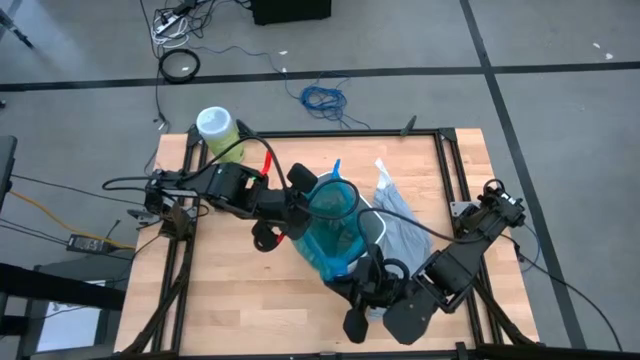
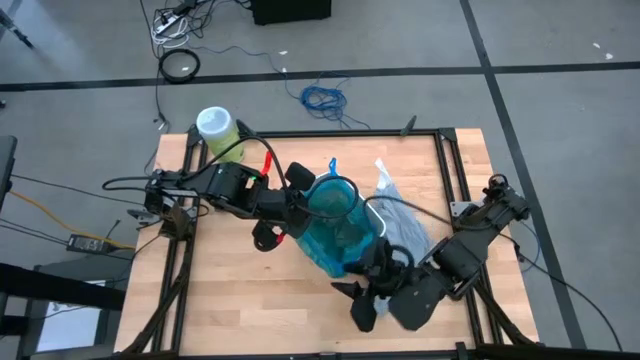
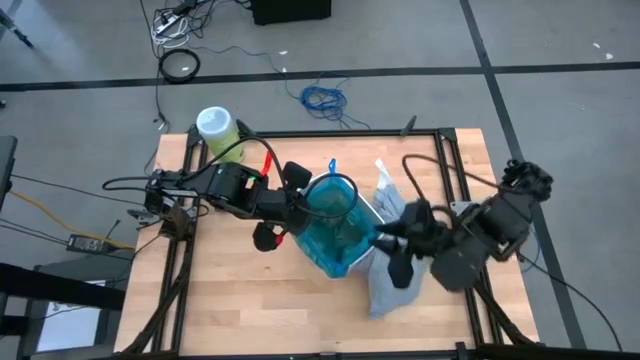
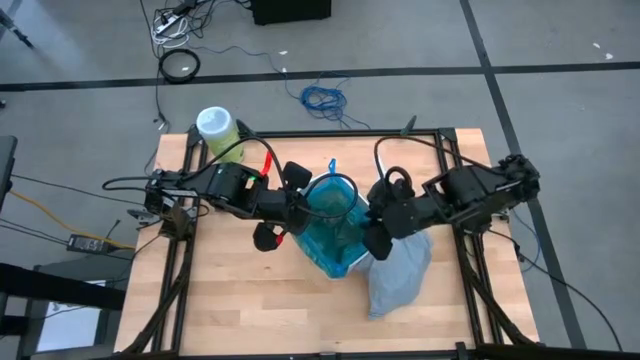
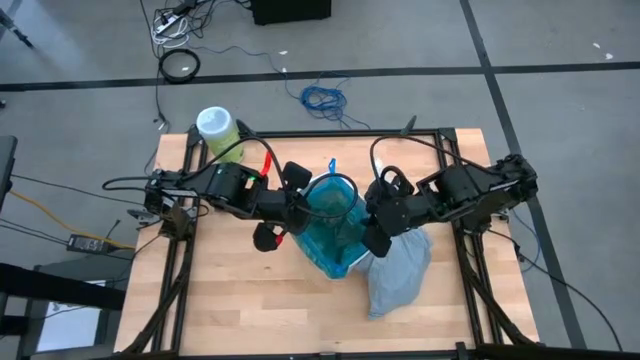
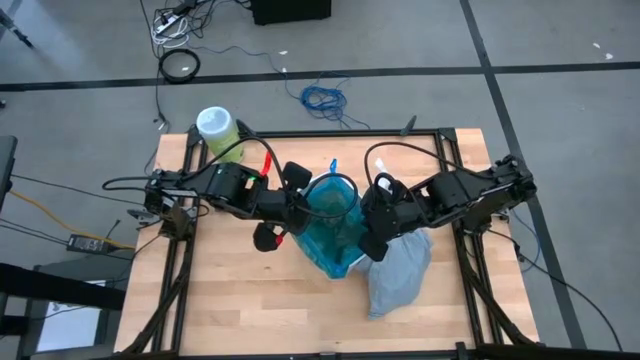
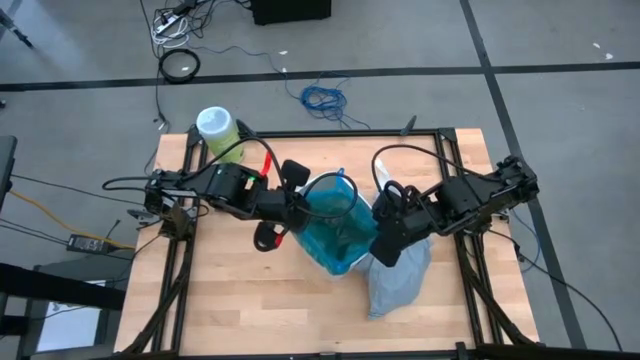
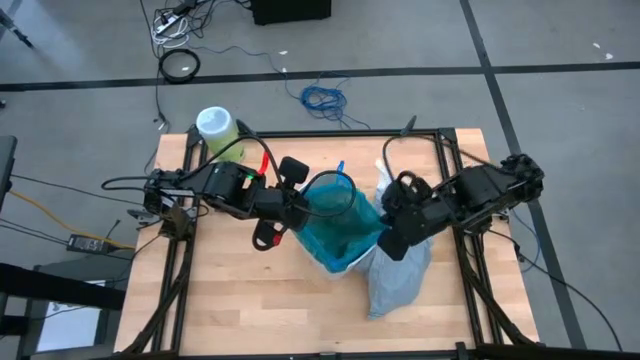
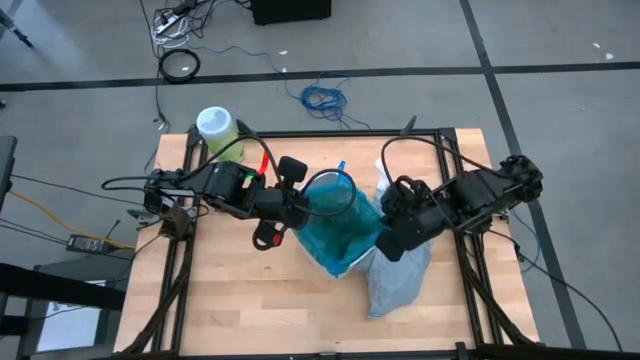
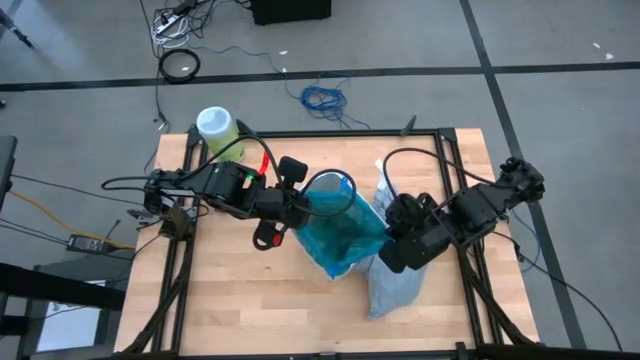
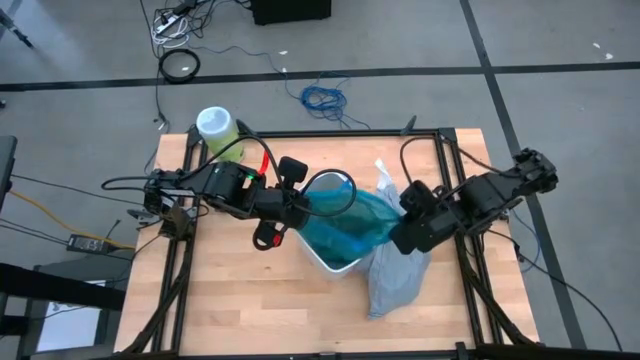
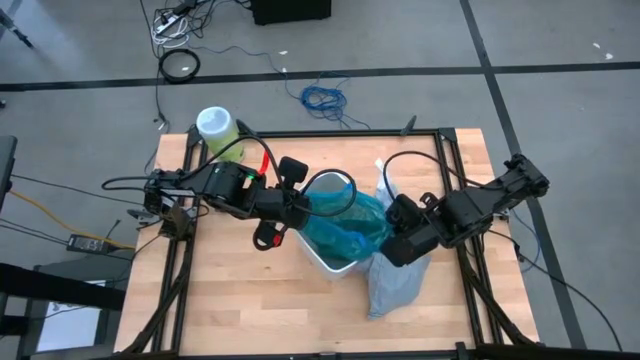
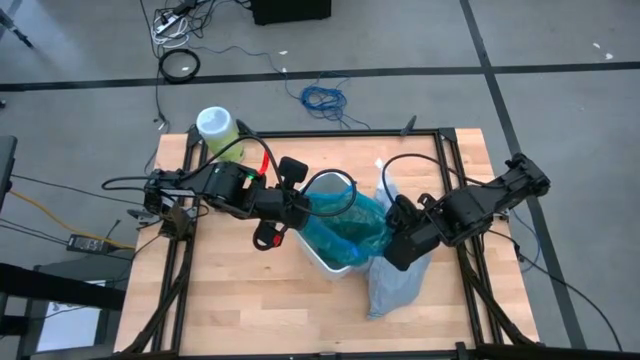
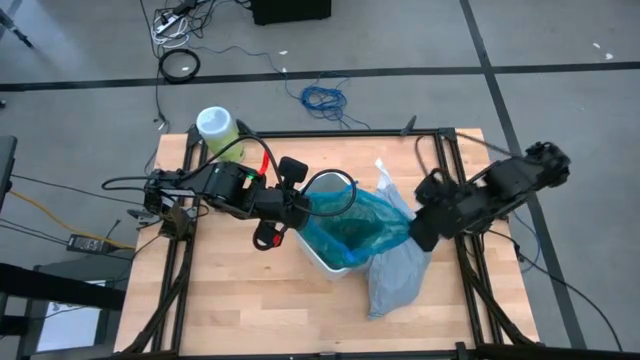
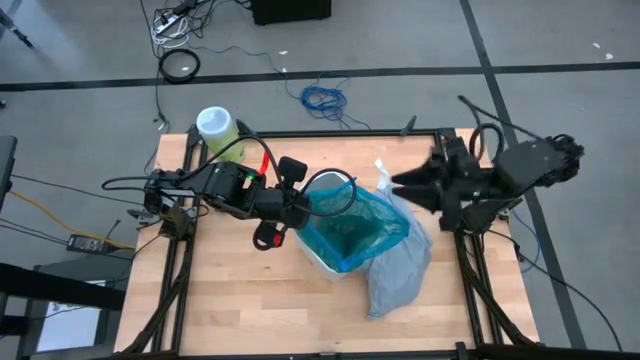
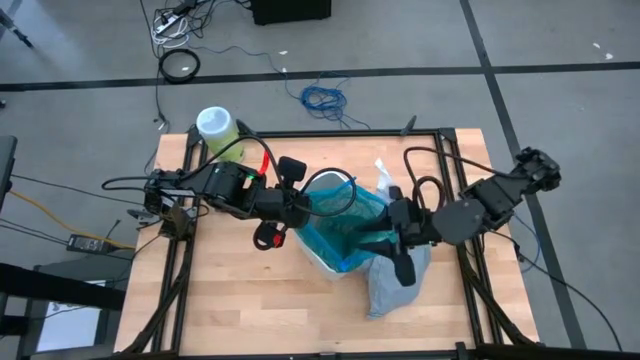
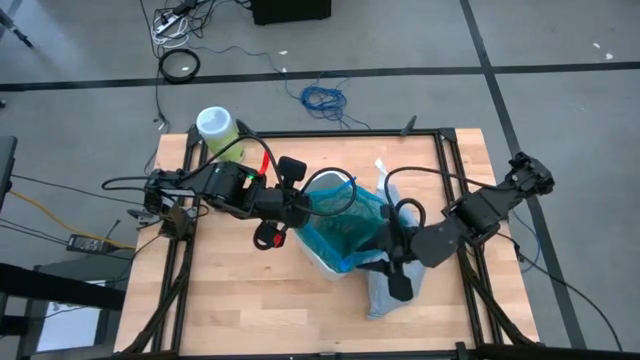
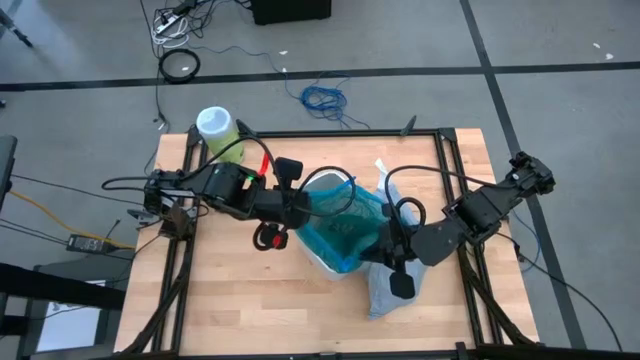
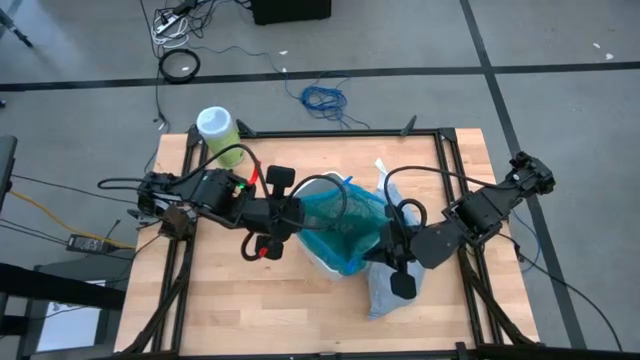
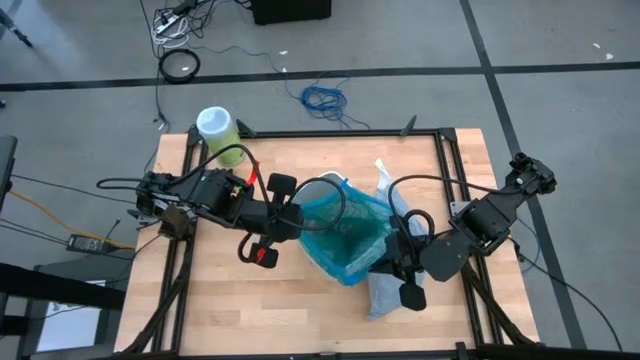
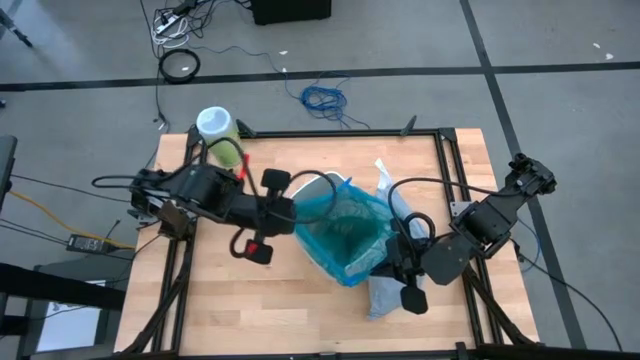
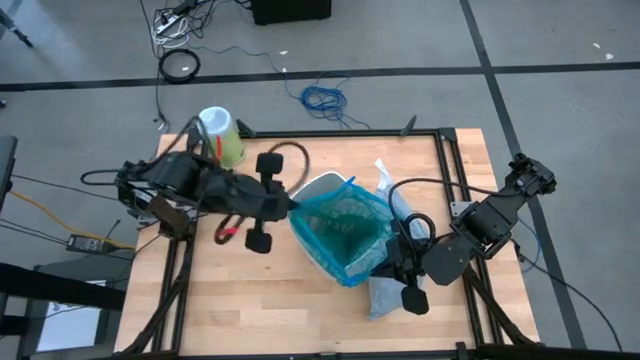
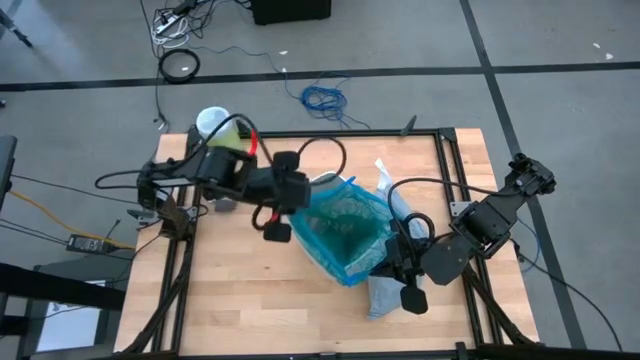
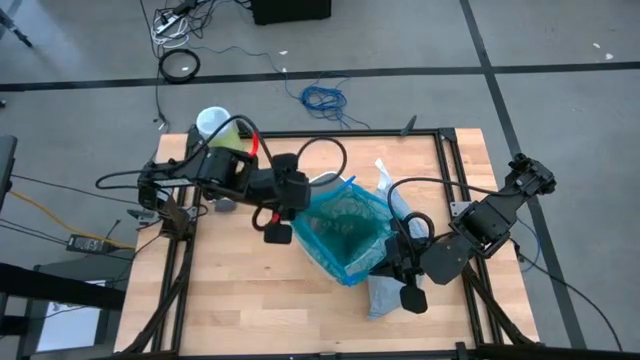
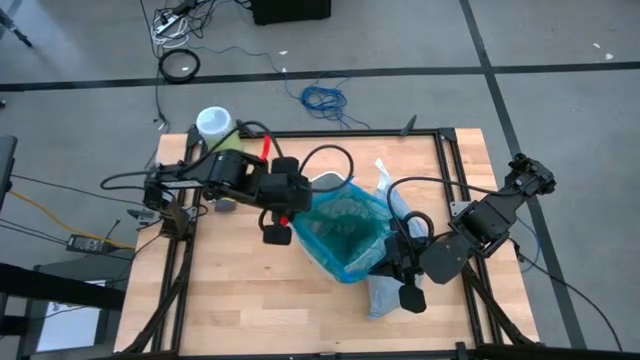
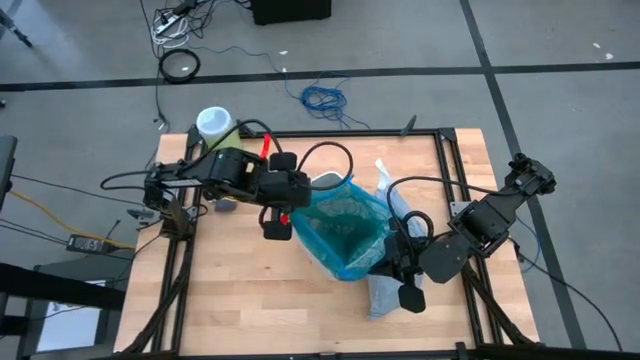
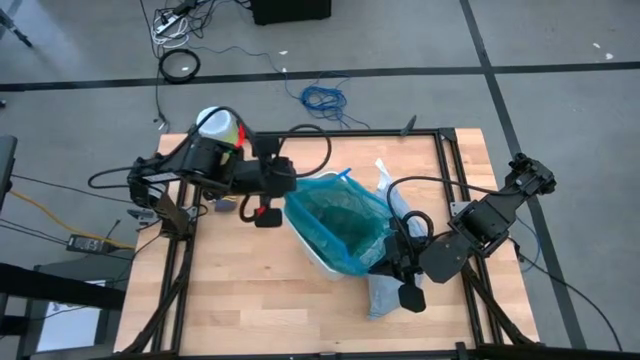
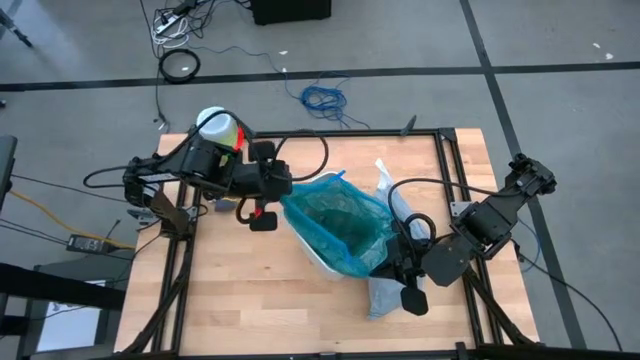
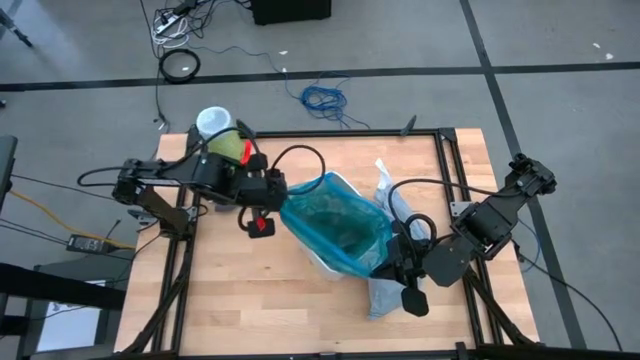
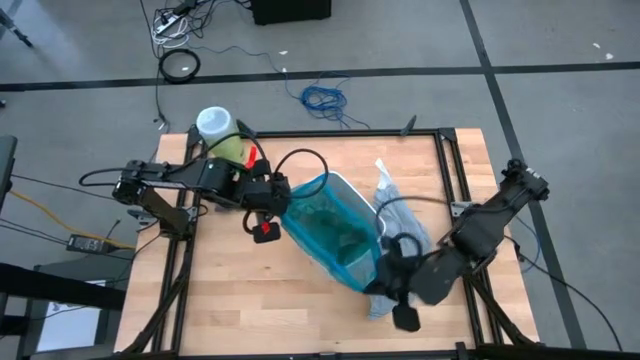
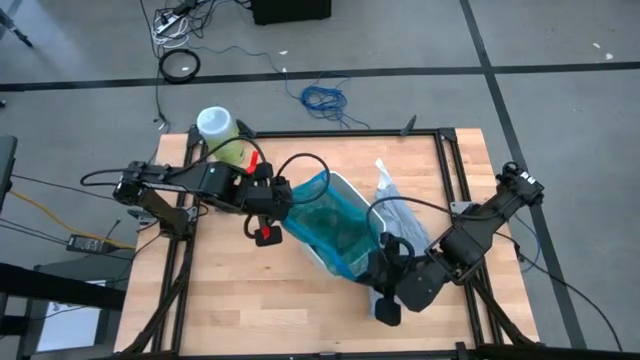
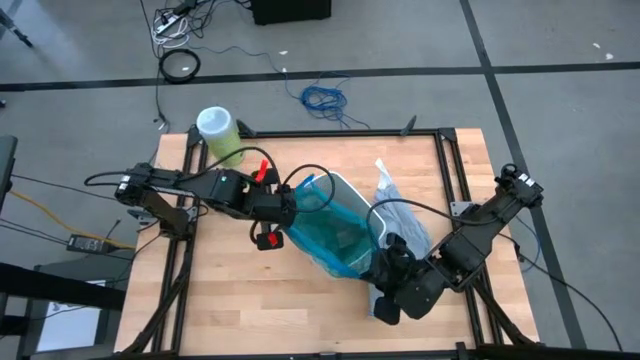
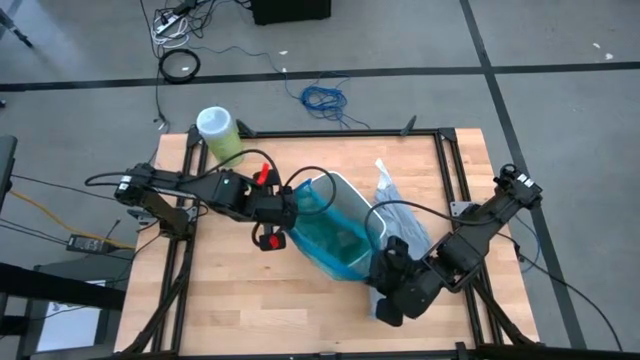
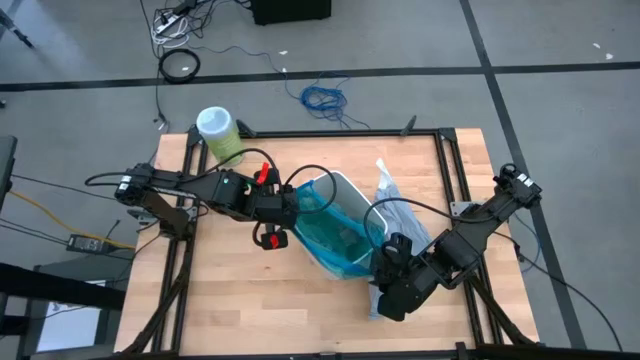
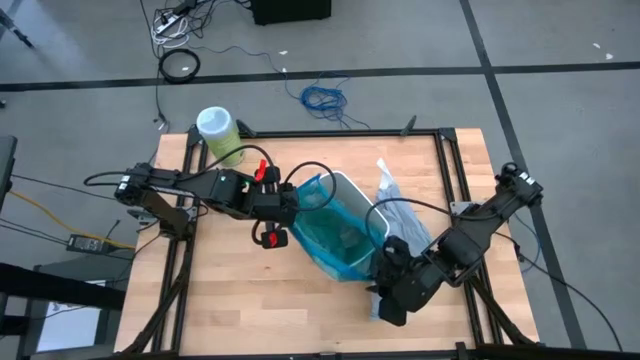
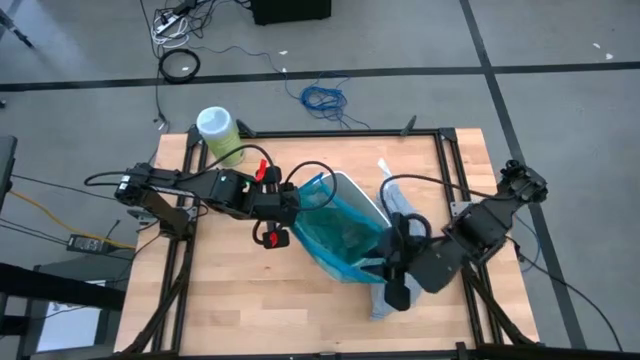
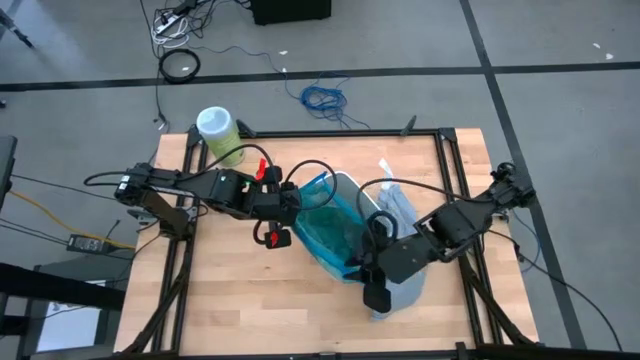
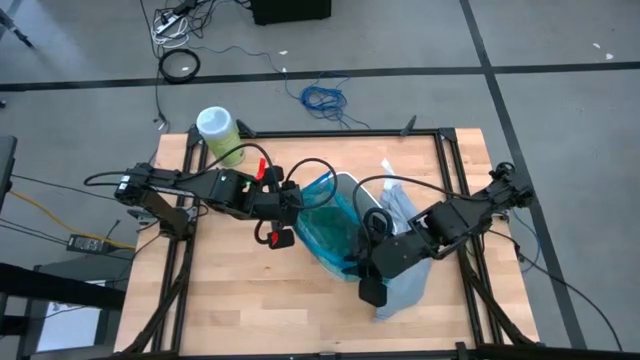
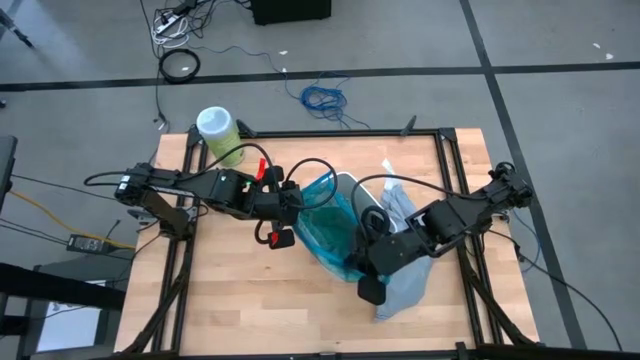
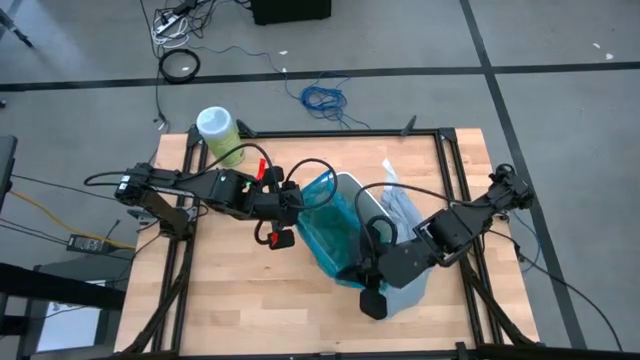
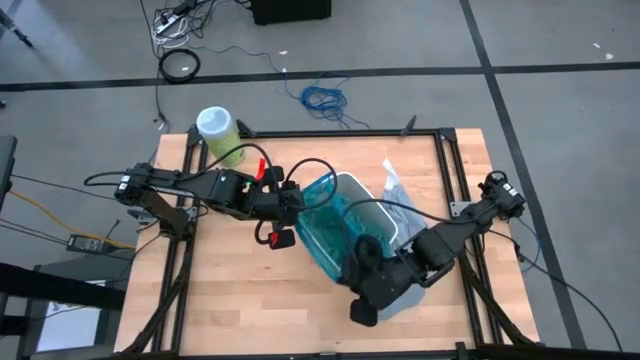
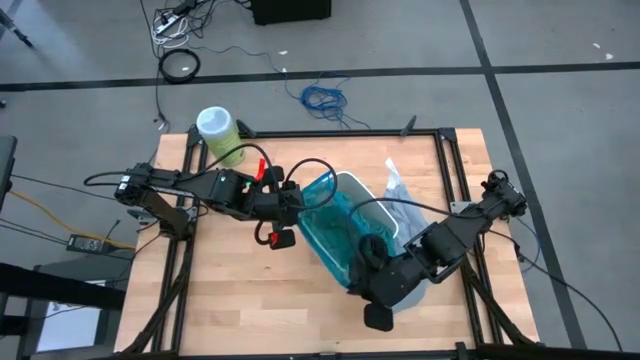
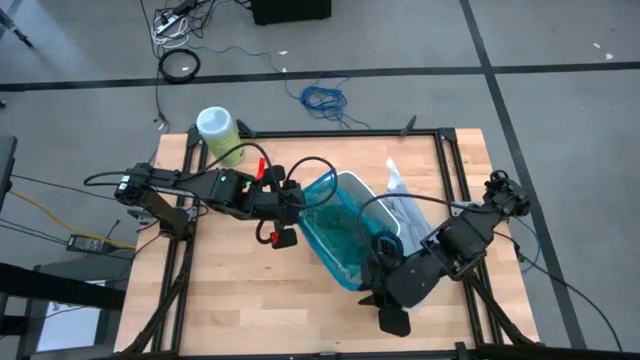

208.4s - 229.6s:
Task: place trash/remove bag and relplace
Put the new dark blue trash bag into the trash bin
